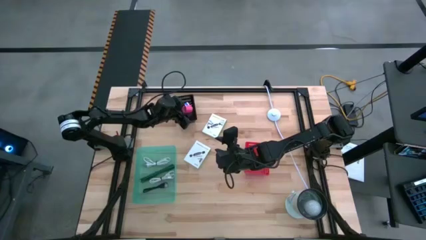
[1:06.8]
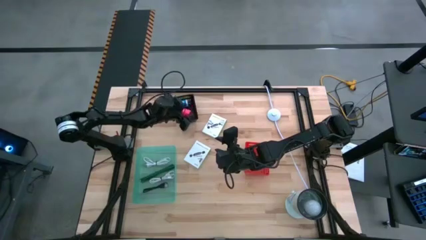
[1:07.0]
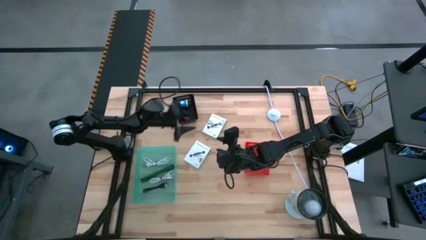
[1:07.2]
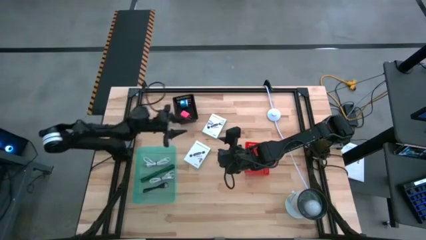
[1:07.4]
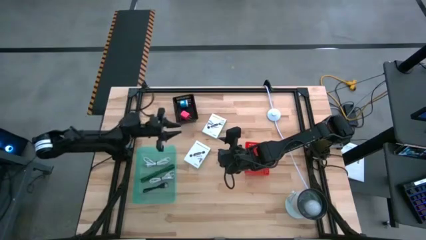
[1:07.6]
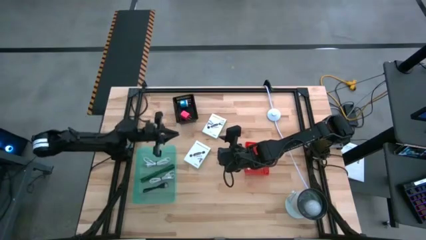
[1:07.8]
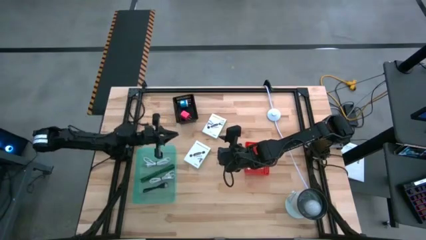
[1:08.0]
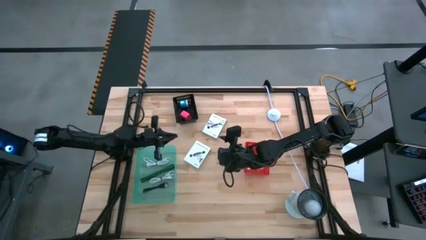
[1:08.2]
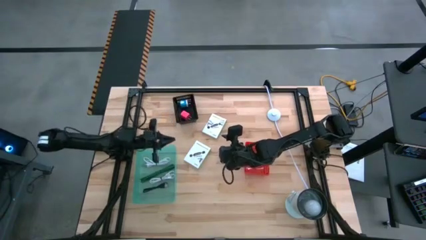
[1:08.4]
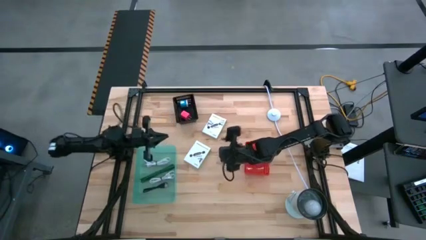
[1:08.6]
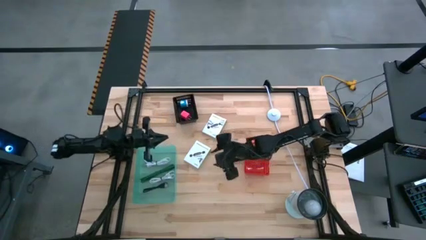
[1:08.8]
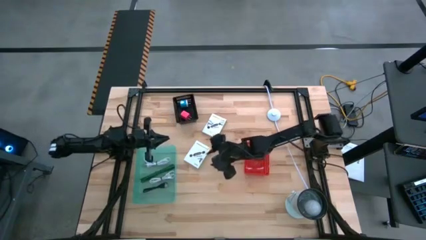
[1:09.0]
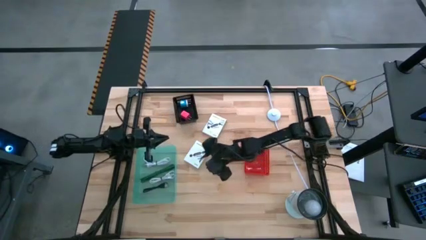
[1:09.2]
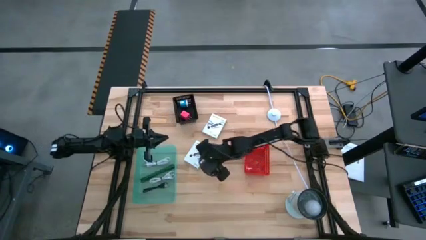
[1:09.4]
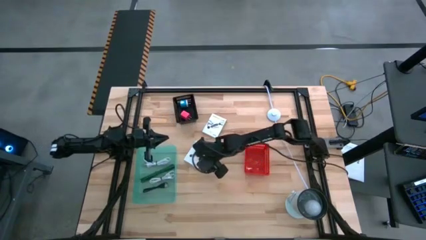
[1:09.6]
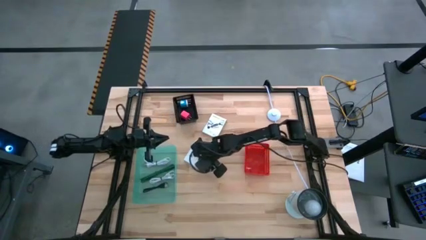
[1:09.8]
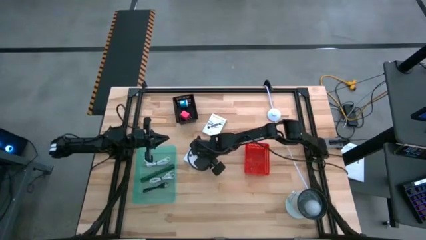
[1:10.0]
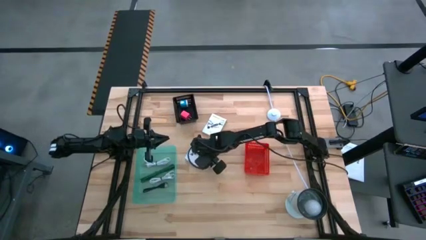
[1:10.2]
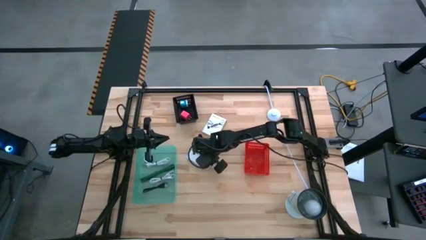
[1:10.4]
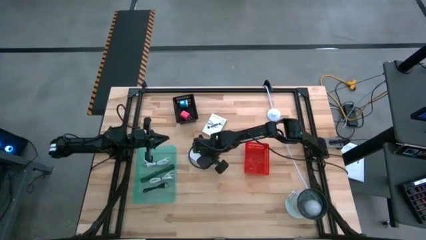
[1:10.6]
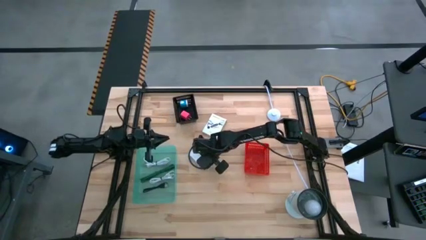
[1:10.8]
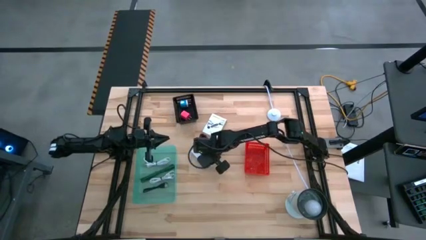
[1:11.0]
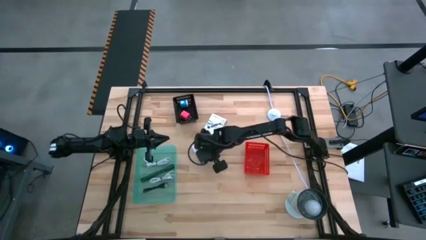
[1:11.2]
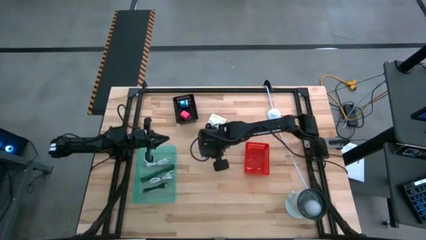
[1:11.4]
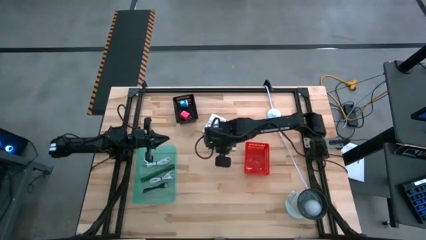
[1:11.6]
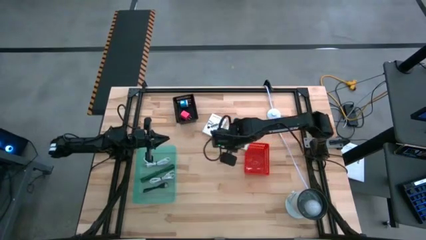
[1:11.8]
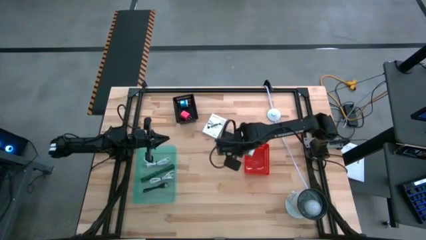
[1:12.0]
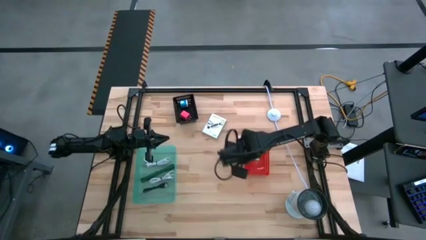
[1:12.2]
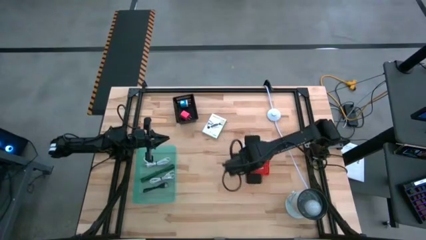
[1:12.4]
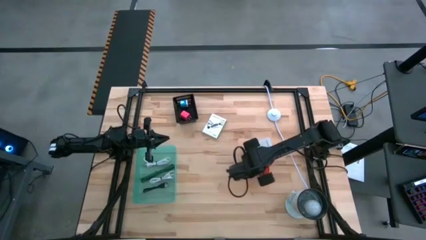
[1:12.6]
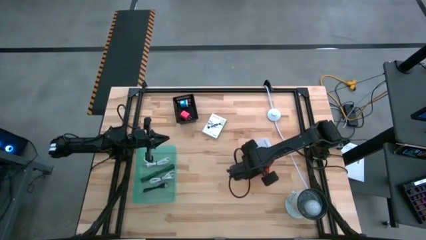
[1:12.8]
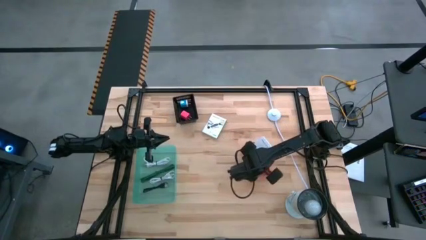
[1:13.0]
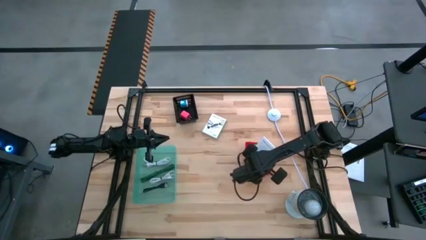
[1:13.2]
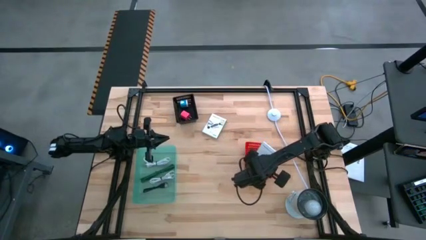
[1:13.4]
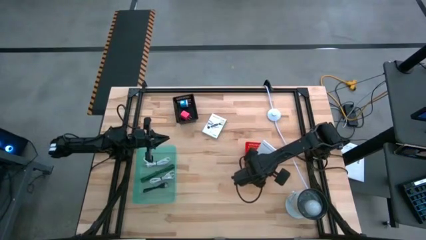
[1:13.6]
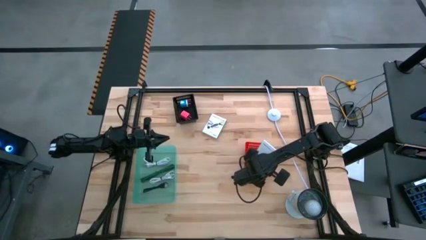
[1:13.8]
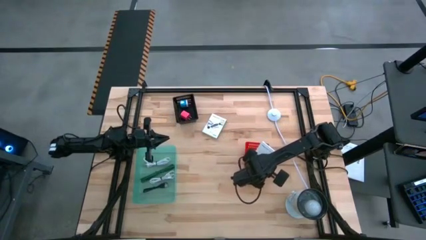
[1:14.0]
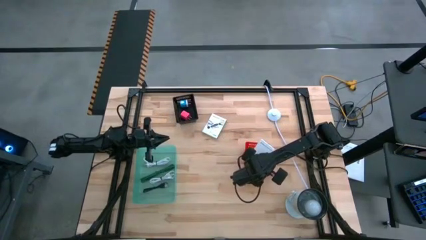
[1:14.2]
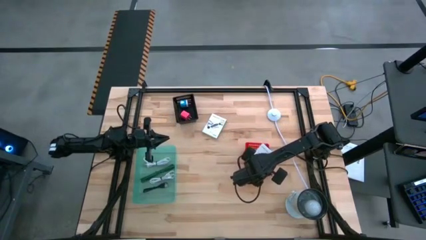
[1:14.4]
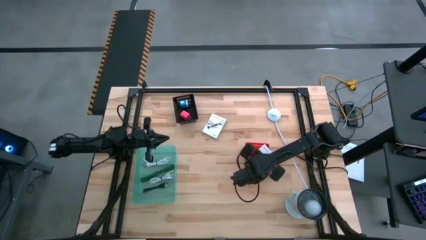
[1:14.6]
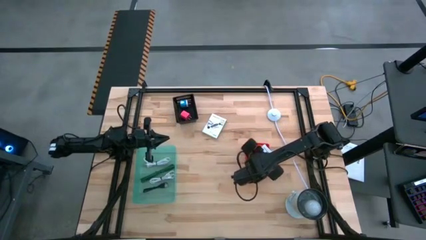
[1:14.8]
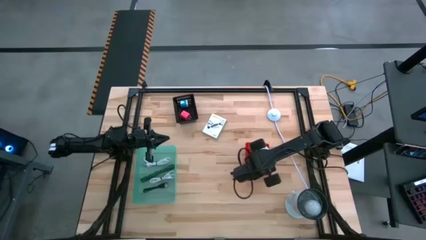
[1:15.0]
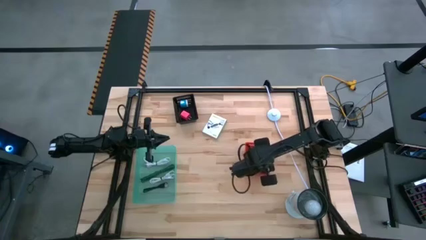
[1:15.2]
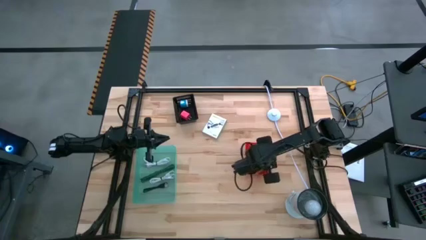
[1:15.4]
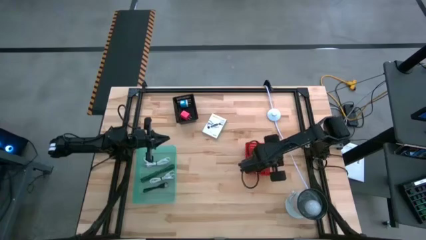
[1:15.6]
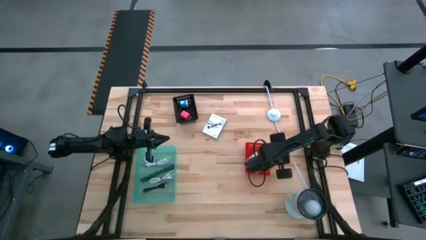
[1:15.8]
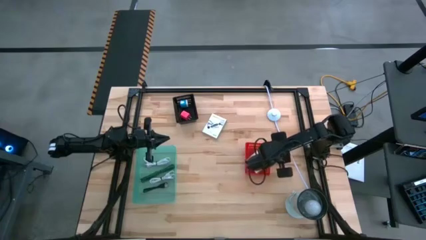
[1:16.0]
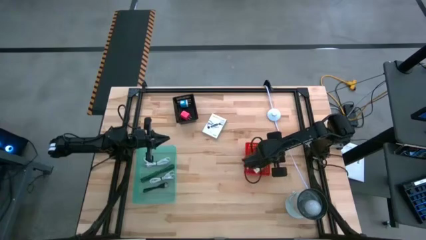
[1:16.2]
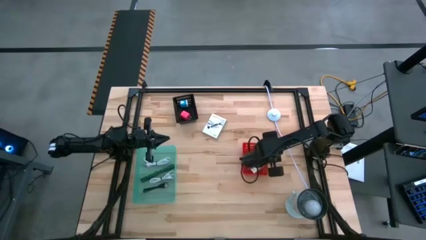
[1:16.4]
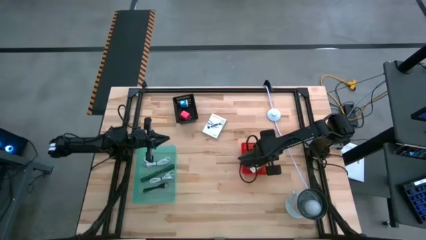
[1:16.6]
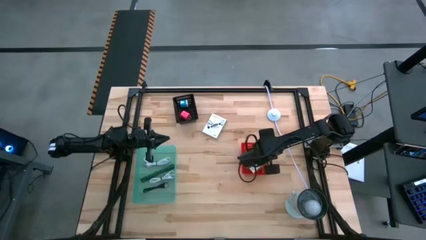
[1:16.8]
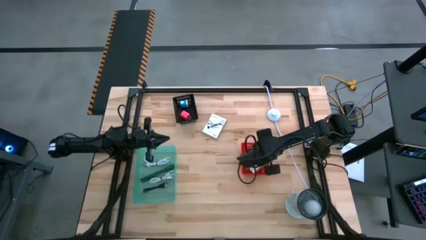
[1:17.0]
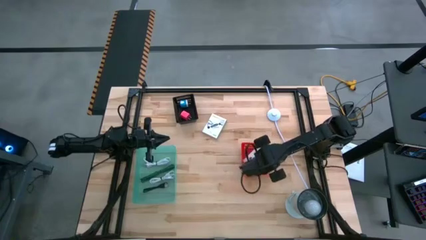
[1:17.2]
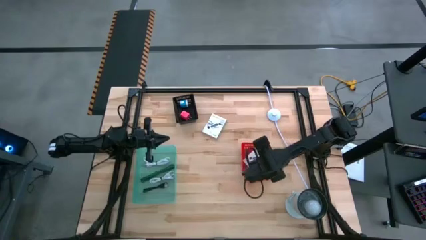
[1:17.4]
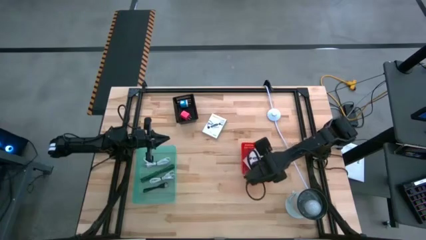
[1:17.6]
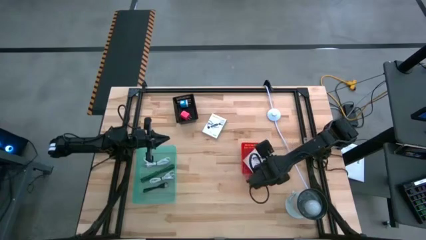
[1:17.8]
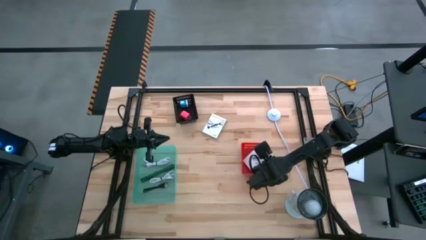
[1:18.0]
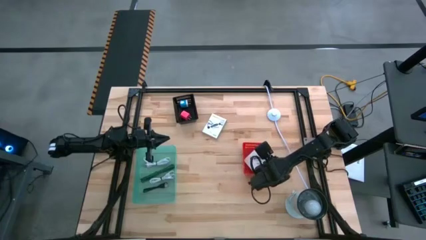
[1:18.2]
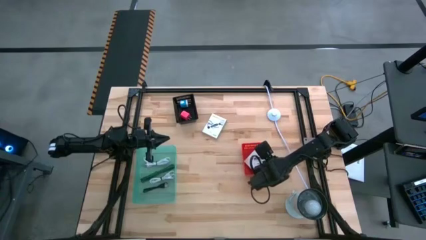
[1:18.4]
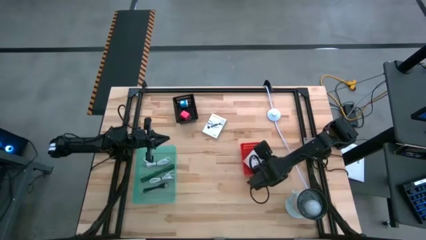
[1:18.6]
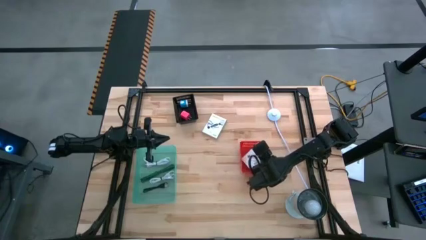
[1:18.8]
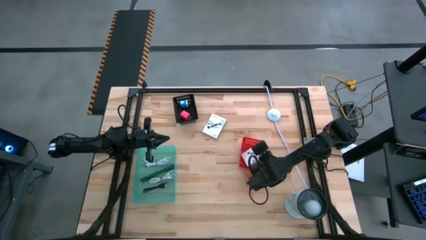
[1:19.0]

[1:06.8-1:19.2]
Task: Pick and place items into bin
Put the bottom white USB box into the orange bin

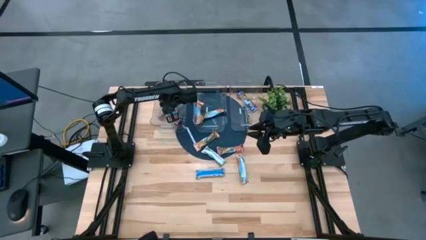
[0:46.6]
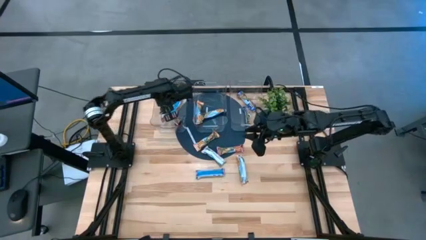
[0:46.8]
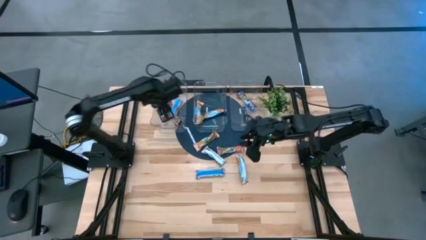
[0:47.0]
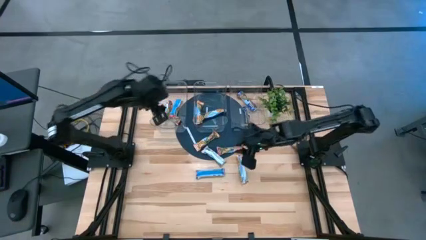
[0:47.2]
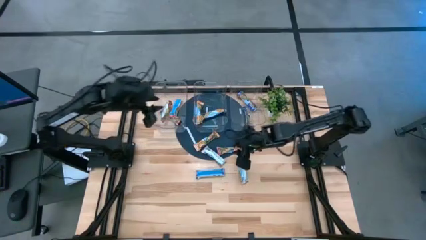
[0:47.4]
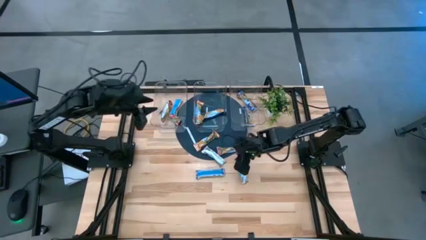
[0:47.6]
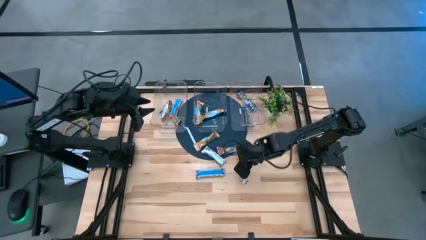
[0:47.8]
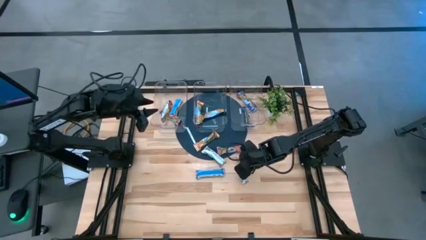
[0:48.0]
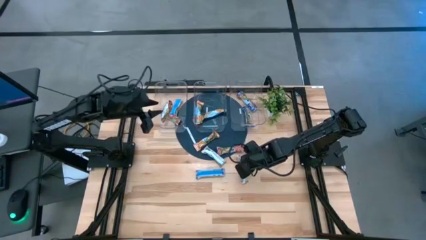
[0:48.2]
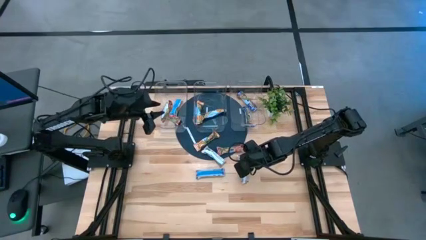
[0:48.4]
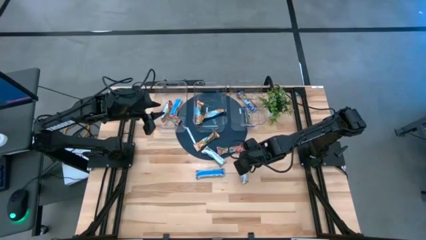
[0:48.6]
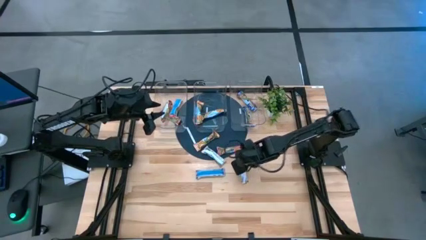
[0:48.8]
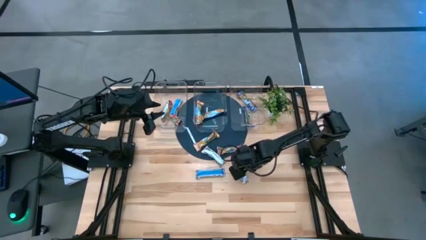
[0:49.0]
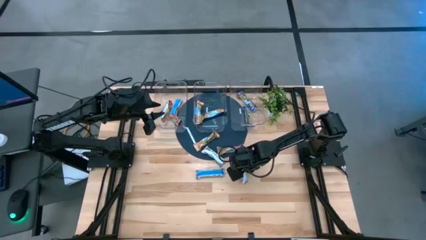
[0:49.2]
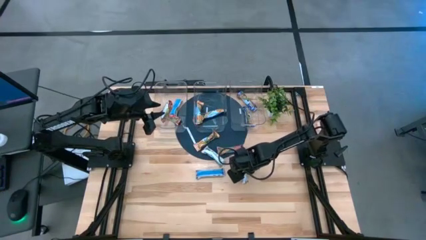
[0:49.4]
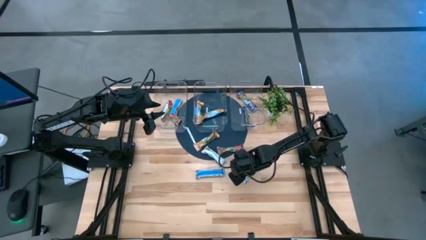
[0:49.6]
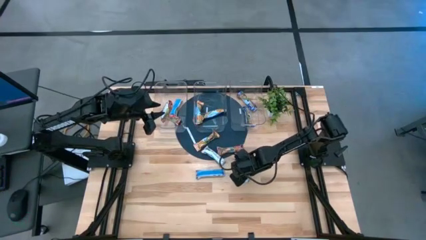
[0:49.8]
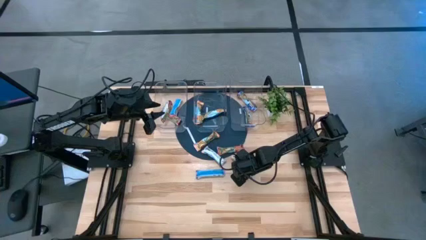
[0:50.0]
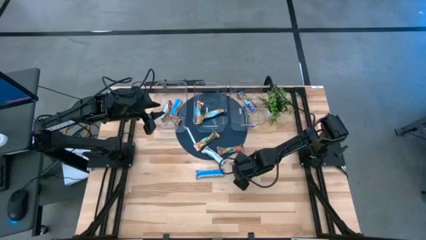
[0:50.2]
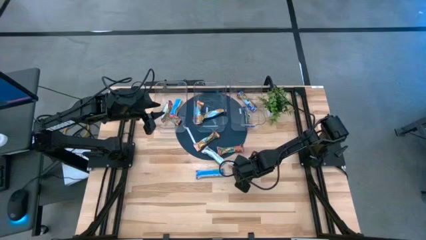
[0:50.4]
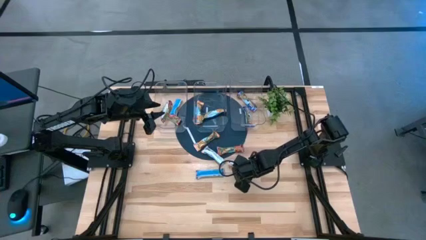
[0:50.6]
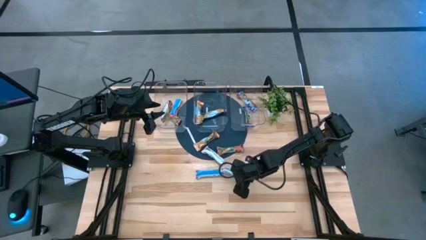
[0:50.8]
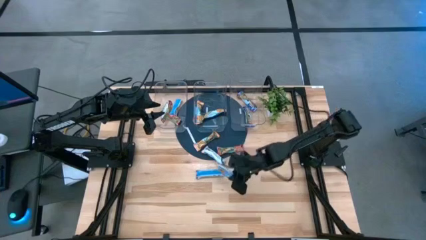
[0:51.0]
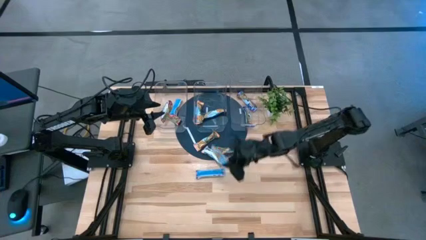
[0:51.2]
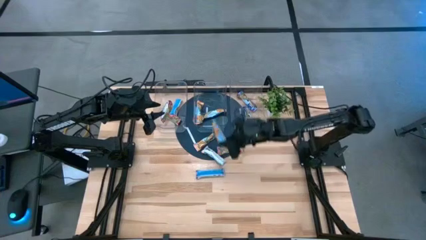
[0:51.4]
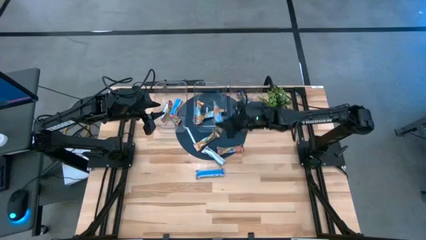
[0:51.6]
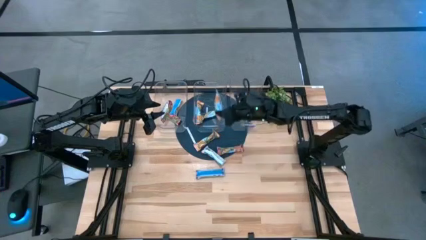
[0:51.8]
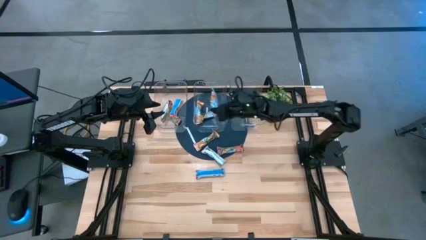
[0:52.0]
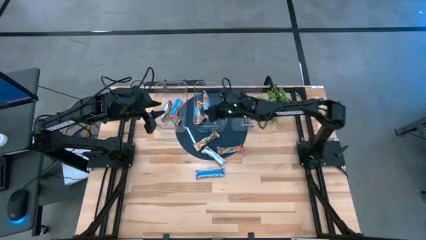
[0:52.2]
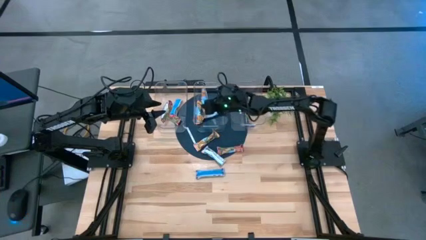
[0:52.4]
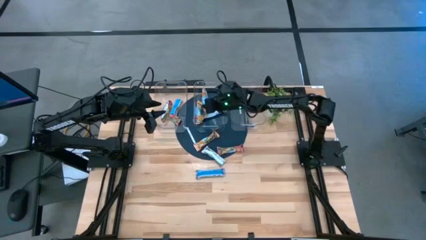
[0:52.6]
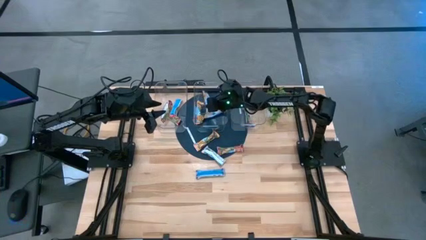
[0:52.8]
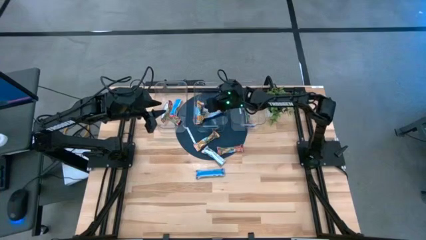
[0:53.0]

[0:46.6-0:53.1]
Task: Pick and place Granola Bars by type
Put the yellow granola bar into the middle transparent bin
